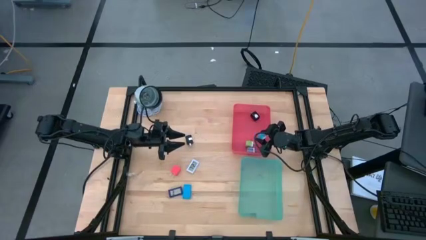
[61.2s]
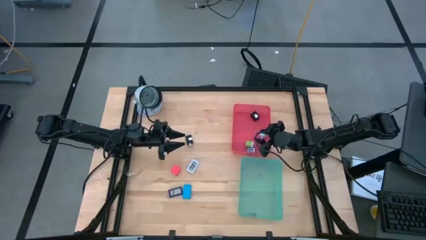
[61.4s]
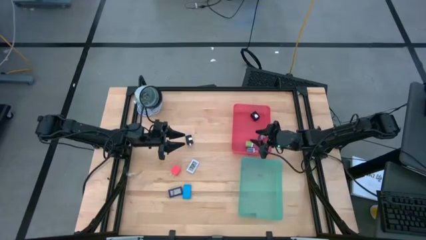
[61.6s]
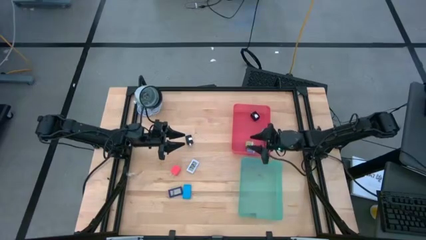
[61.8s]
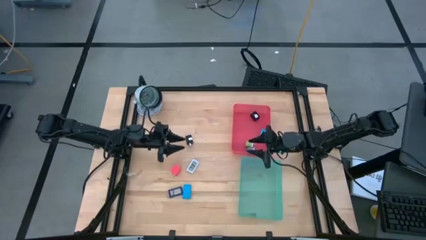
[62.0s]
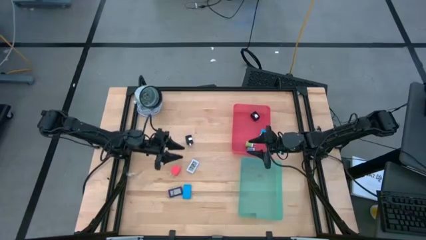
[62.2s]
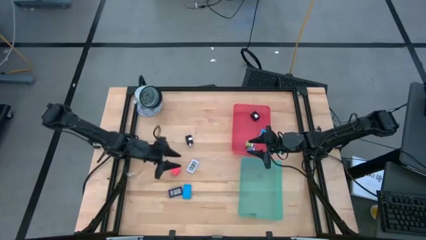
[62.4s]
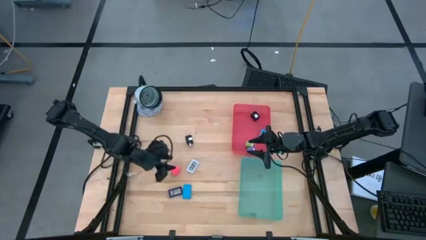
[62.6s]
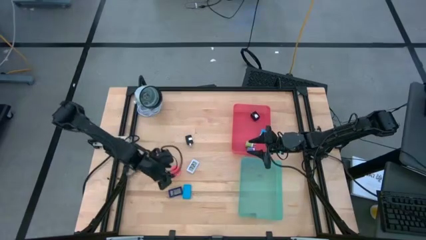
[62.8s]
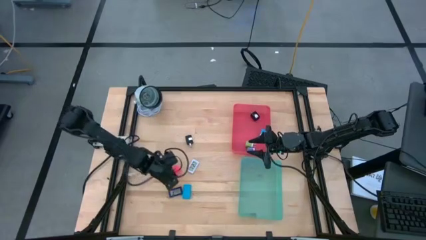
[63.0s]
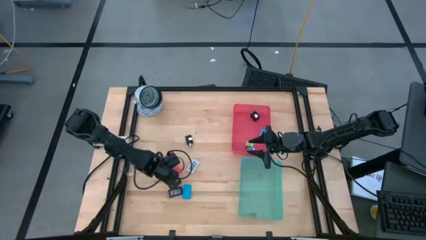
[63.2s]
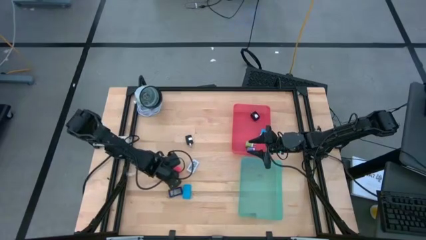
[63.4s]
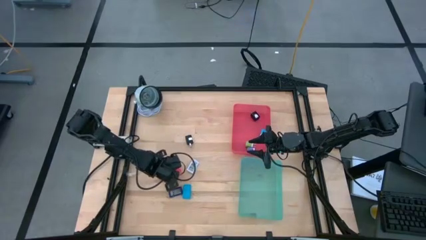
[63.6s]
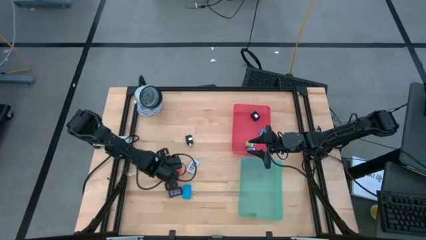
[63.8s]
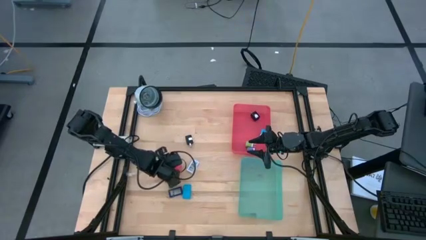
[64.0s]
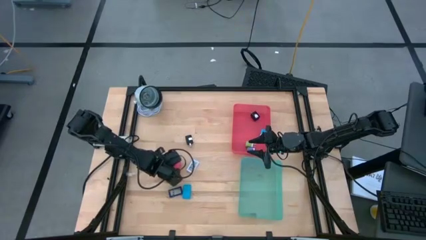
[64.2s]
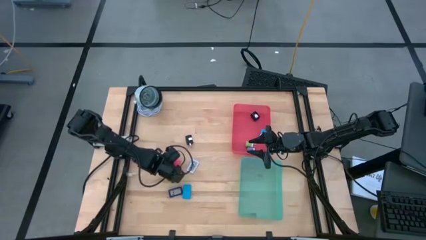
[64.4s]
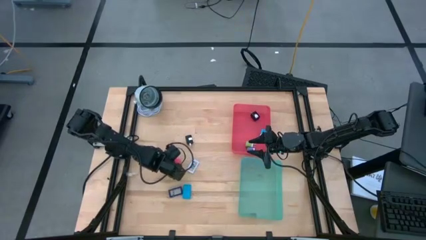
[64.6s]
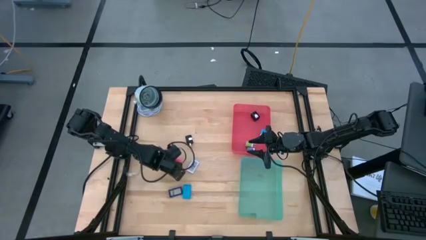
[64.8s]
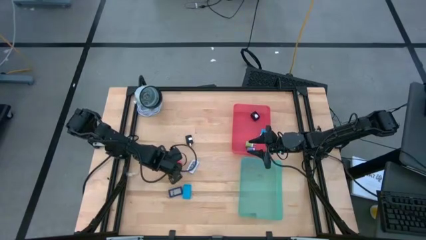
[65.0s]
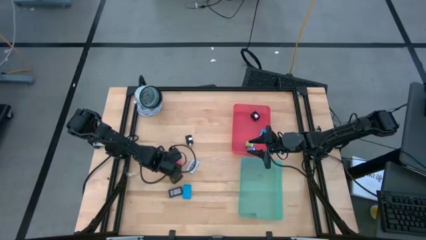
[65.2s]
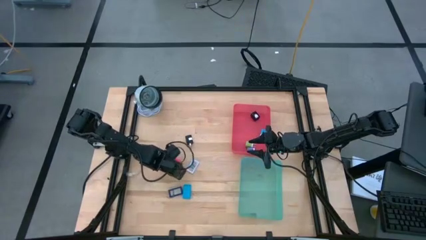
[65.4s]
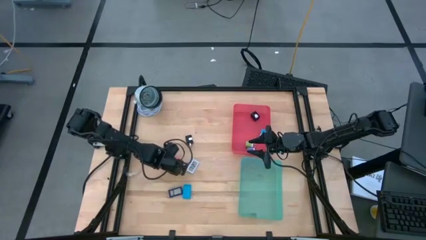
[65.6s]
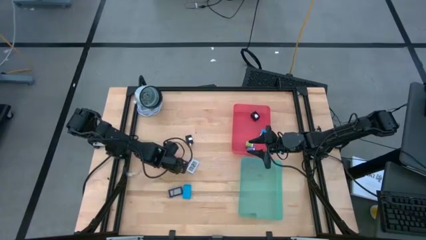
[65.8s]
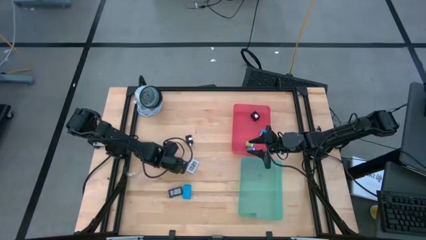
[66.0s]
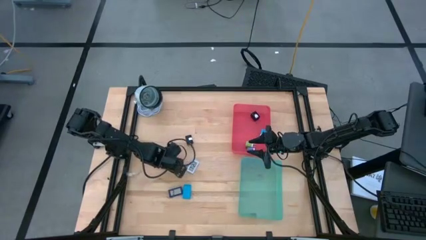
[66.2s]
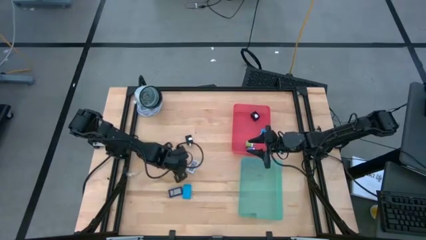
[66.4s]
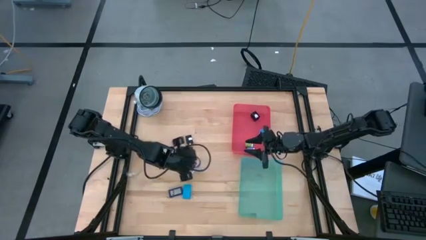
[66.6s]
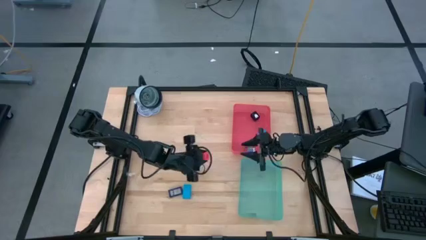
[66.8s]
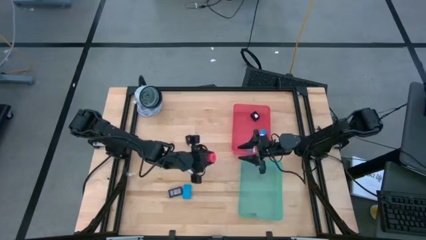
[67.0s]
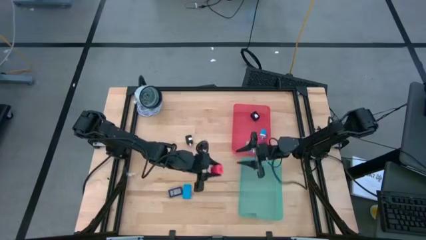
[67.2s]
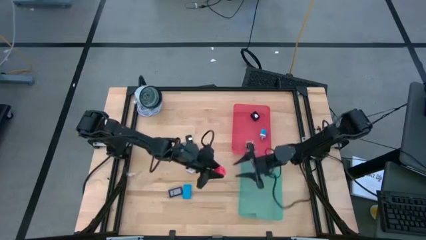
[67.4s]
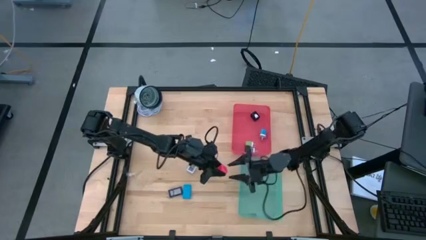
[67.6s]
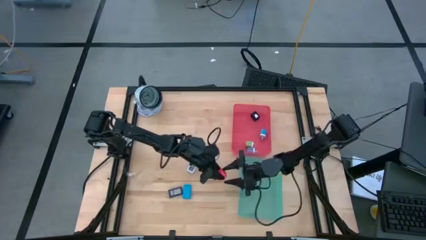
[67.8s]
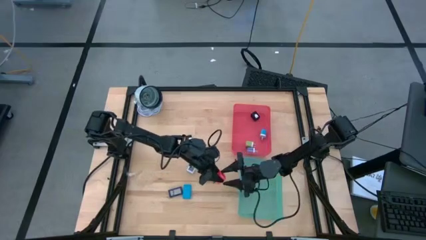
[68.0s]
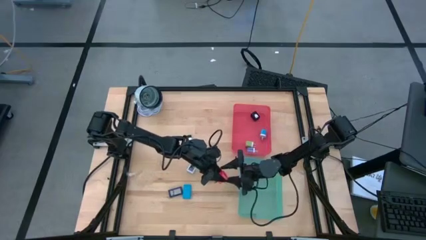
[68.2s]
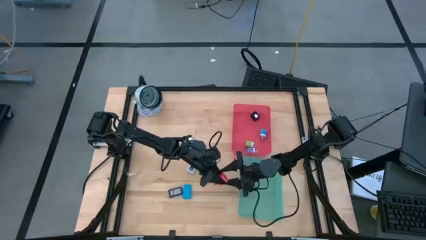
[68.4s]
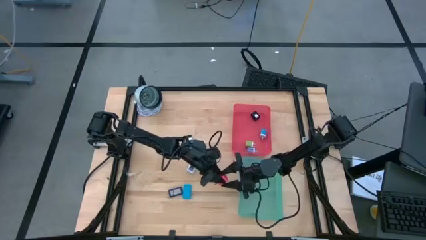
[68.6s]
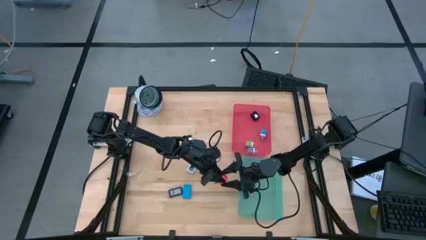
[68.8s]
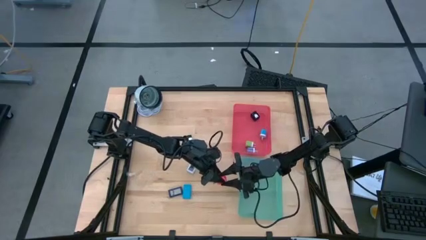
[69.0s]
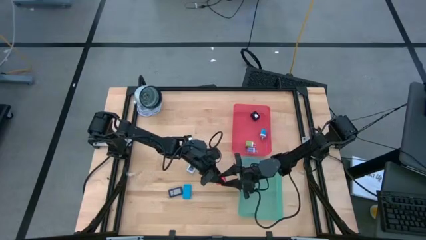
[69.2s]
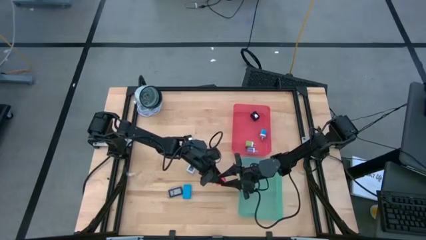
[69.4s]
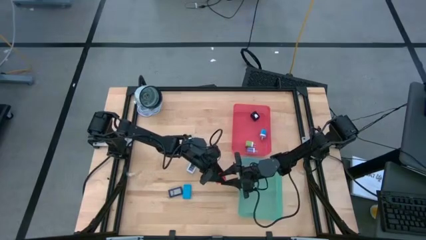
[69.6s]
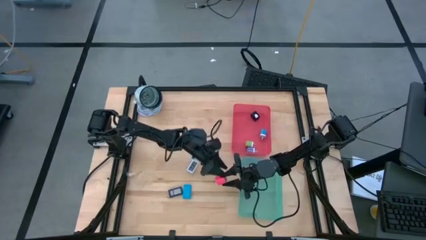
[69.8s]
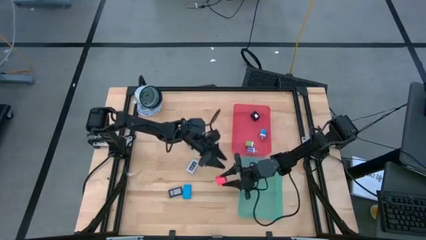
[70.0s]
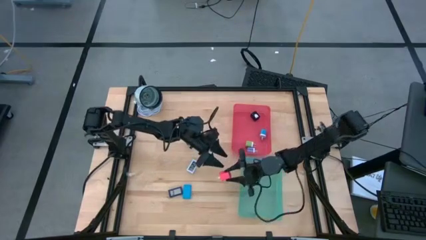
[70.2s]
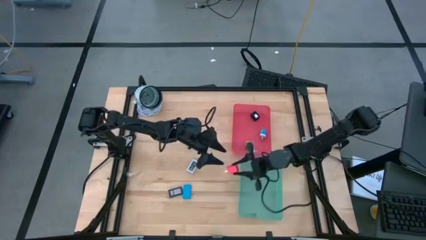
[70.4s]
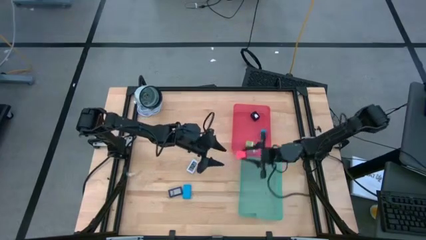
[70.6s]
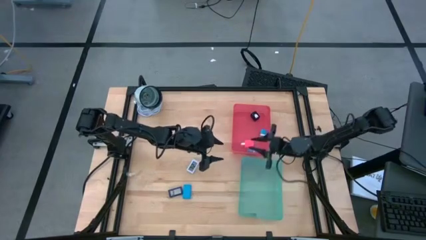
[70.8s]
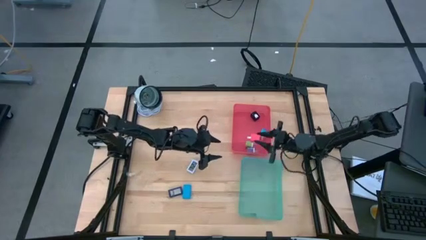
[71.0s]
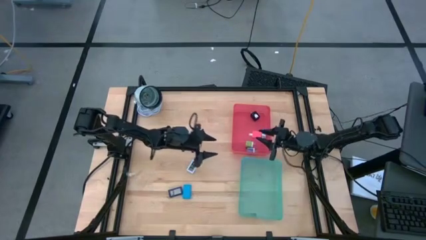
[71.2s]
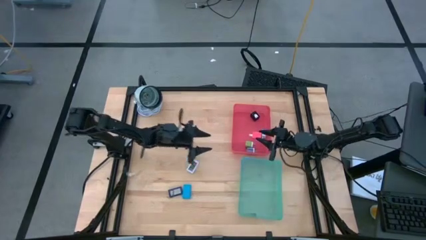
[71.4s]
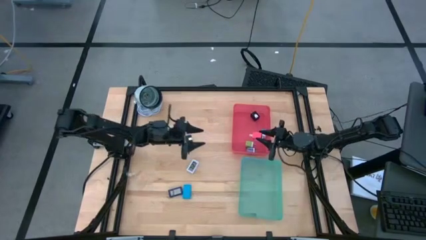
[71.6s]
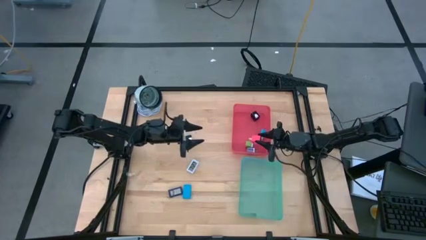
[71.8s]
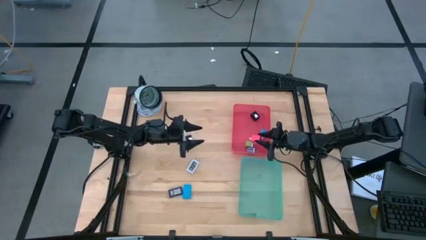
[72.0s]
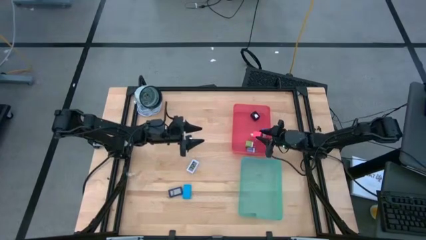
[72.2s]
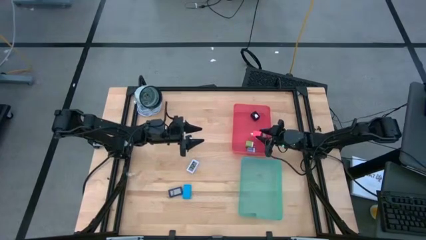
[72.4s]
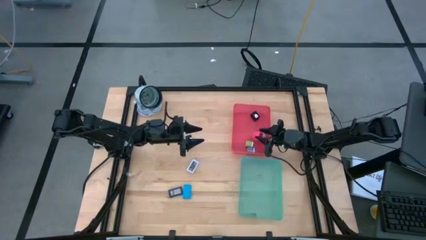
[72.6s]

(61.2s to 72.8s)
Task: Pick & Place Office items
Put the pink charger adapter into the red bin
